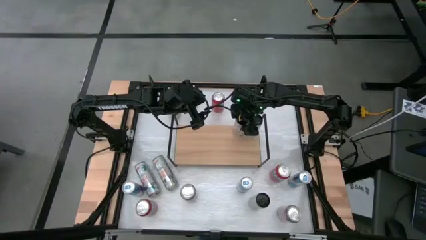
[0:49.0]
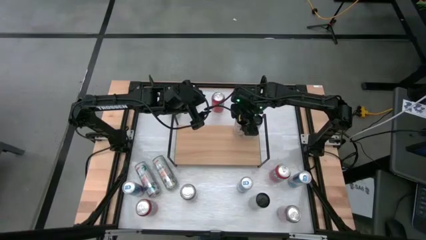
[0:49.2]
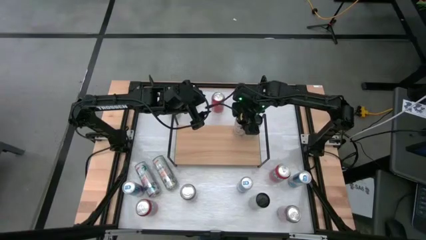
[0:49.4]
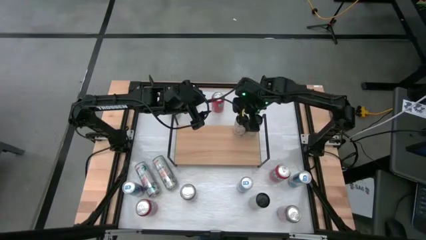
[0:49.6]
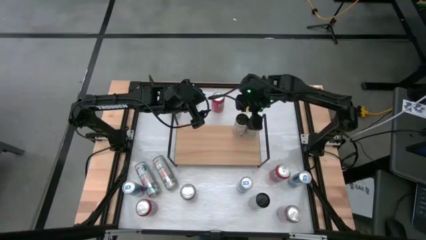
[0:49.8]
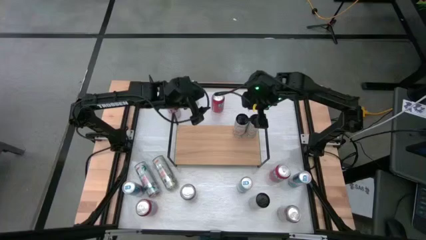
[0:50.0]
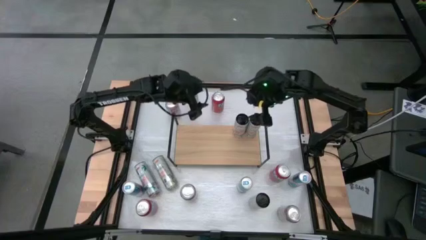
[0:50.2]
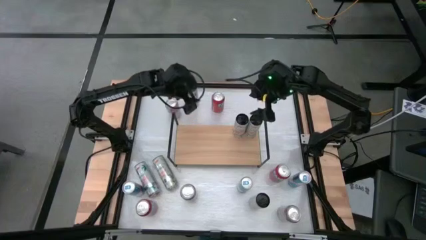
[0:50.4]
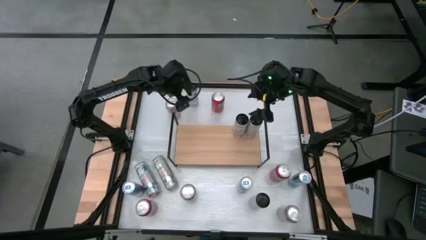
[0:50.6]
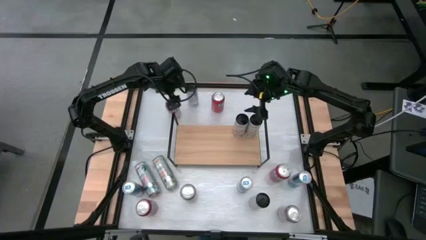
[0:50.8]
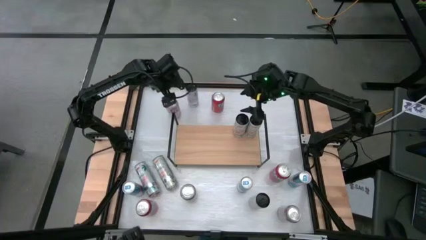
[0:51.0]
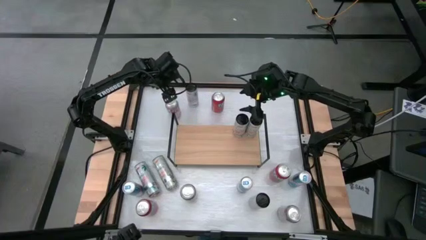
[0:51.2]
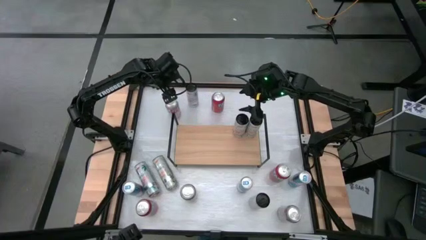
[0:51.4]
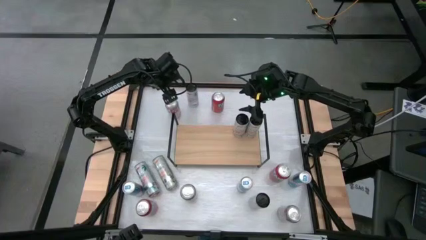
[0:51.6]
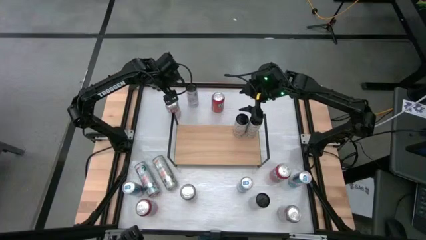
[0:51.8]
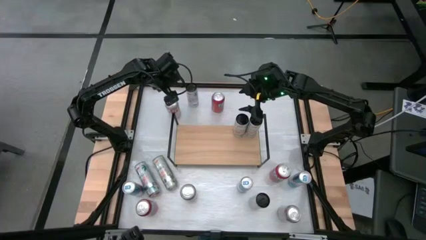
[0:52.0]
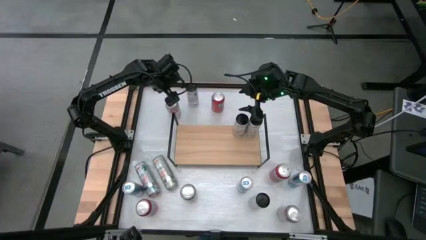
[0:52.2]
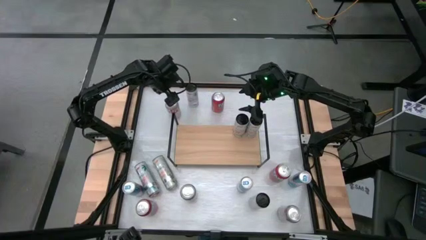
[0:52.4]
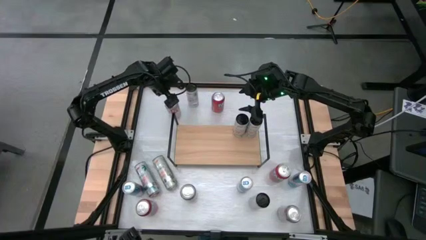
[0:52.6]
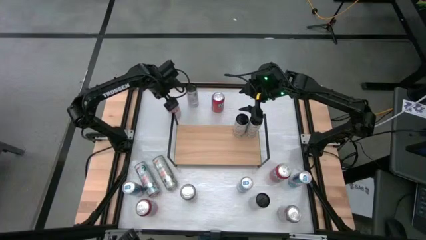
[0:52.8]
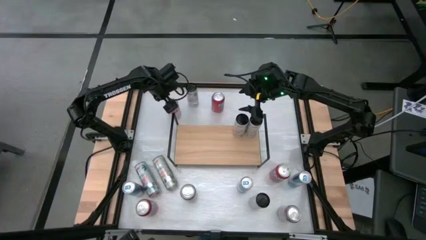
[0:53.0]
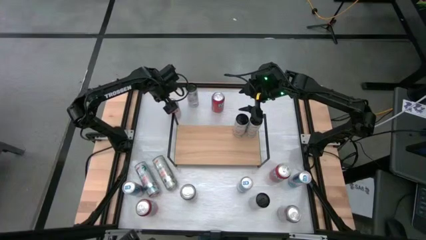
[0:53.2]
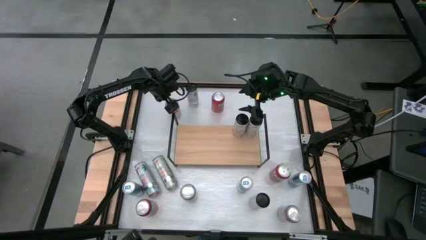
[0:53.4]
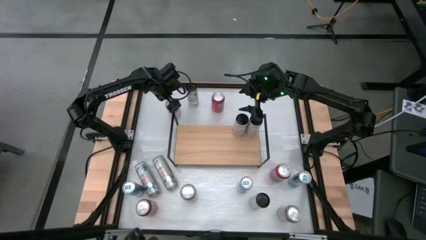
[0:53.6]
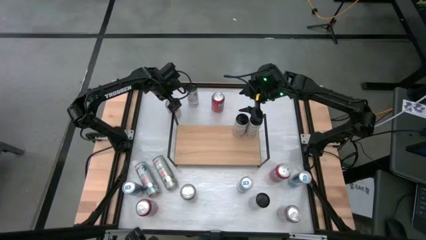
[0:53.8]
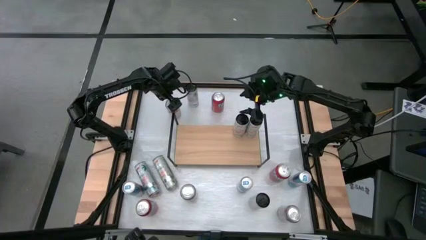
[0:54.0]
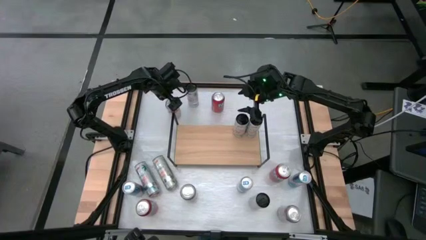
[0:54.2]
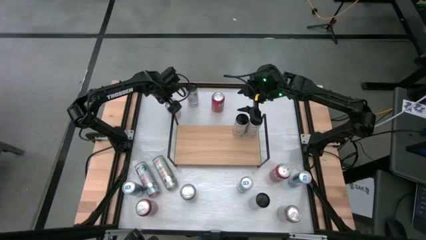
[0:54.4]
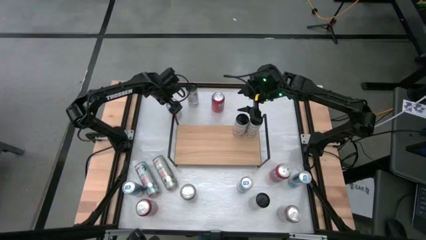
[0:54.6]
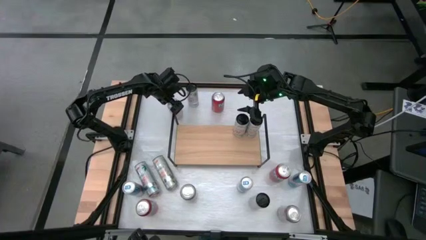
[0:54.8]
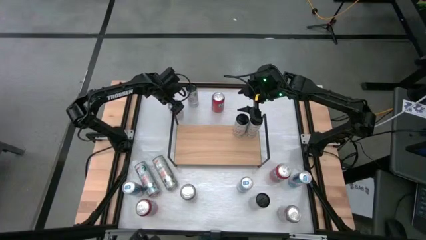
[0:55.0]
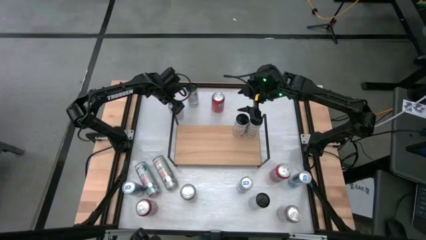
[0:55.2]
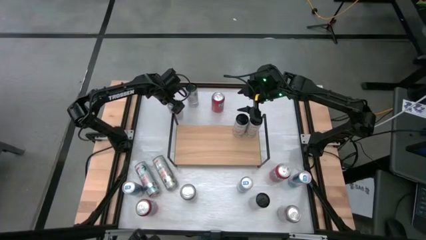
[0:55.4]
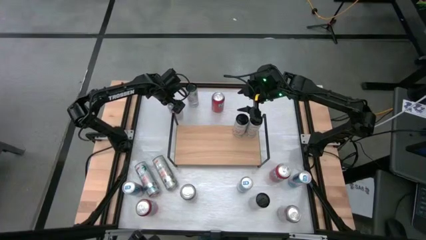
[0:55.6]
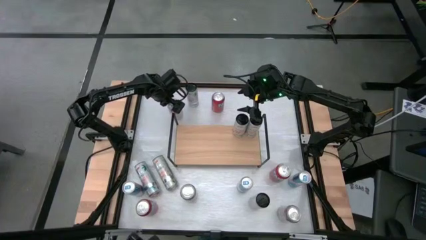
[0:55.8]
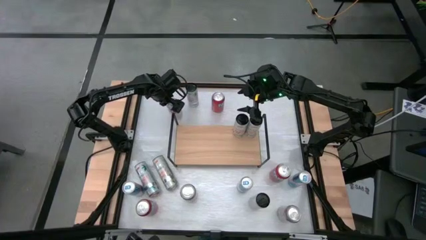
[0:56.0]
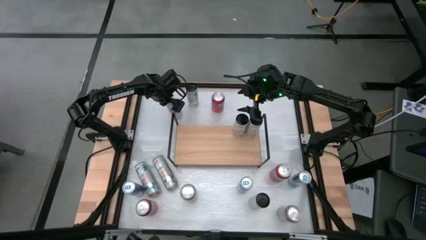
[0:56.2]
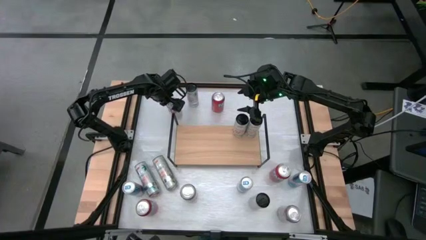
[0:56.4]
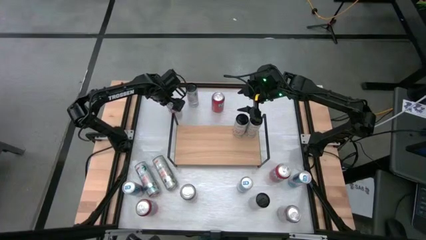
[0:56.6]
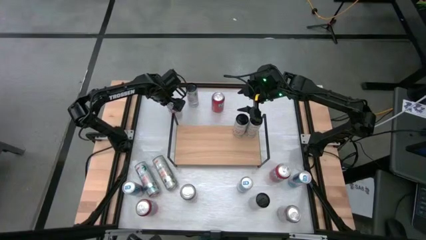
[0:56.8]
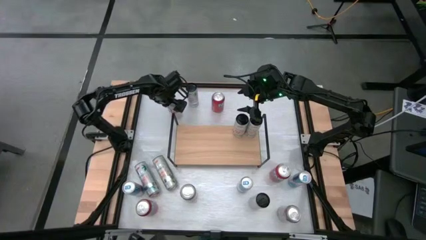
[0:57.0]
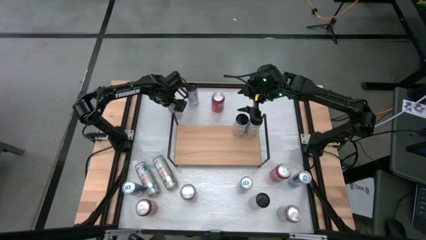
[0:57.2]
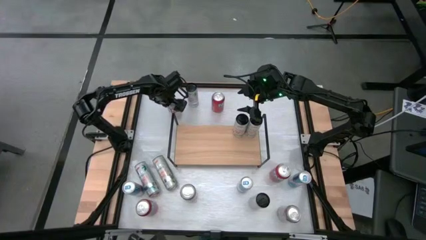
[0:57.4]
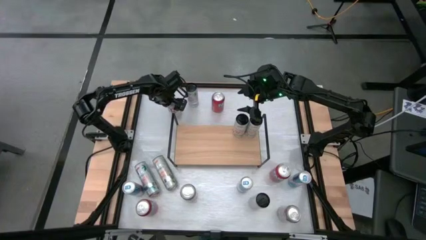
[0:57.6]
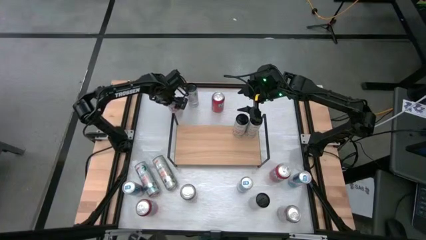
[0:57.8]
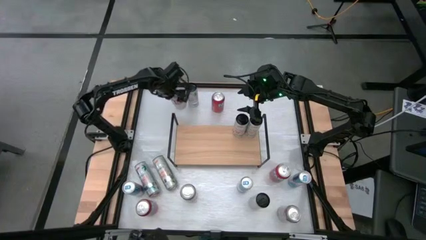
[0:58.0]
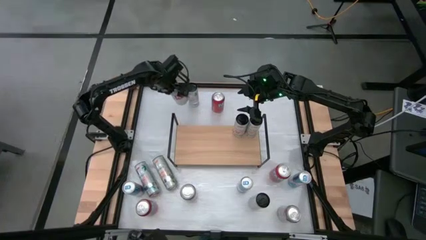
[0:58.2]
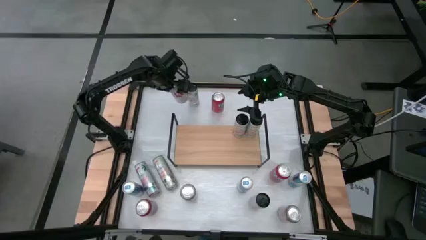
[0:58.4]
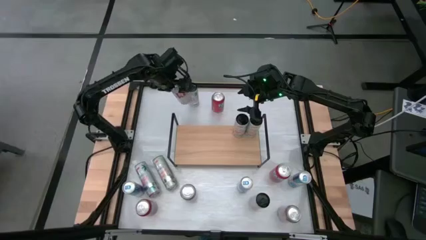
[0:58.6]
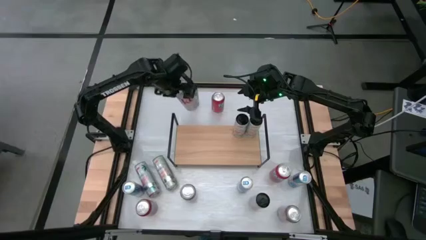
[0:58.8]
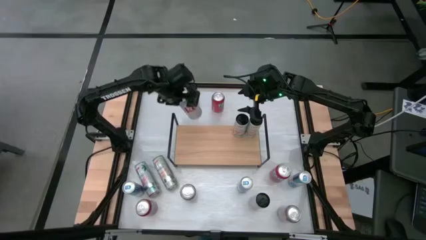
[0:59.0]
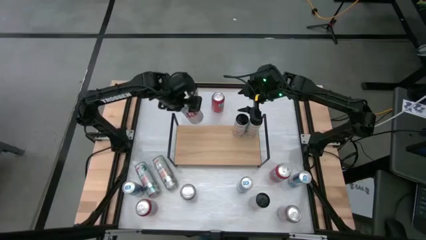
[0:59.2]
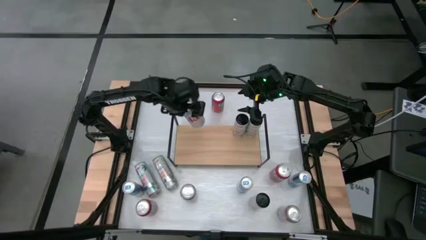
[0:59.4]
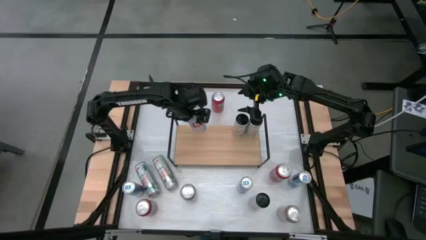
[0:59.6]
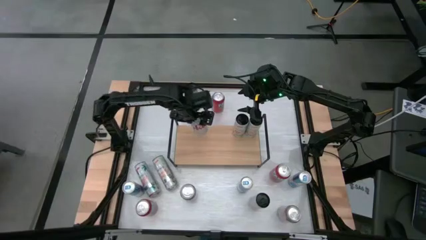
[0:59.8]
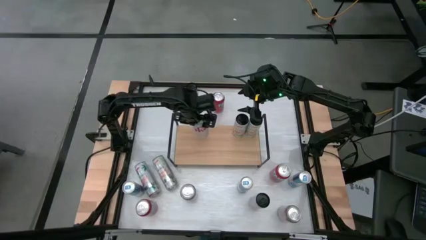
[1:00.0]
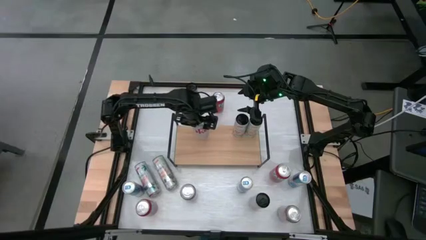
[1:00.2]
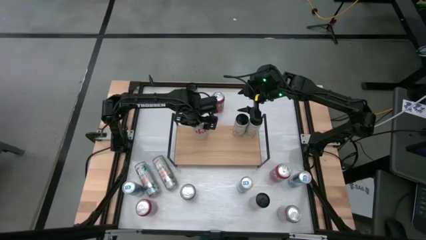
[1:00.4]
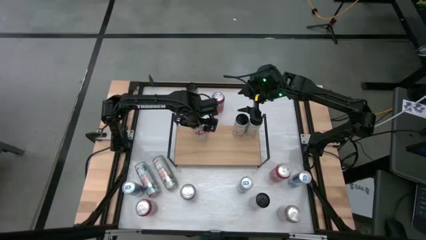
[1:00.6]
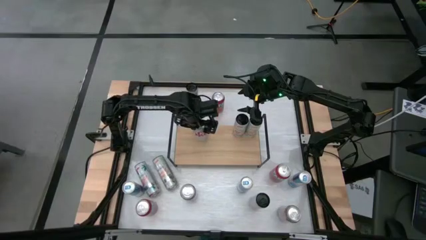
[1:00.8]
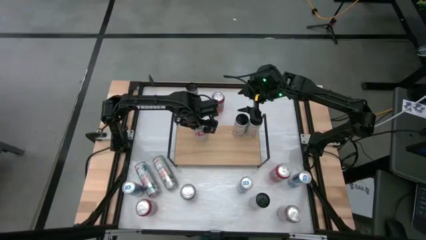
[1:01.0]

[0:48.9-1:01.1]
Task: Place canned beverage on shelf
Put the top left silver-red soda can on the shelf
